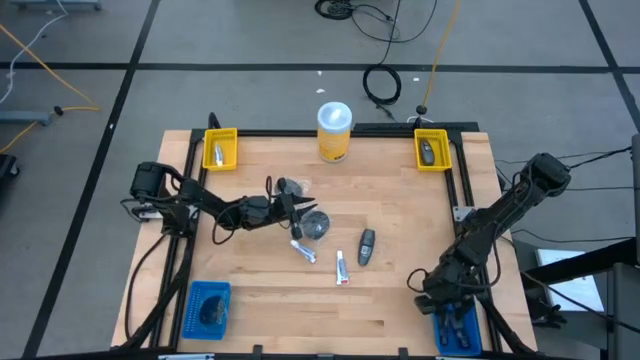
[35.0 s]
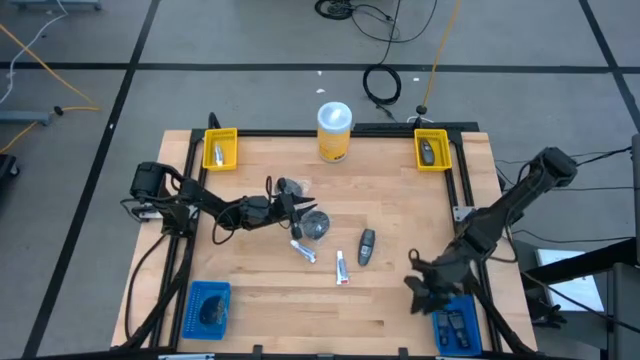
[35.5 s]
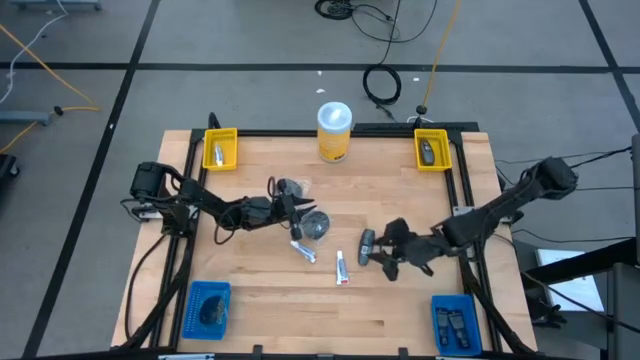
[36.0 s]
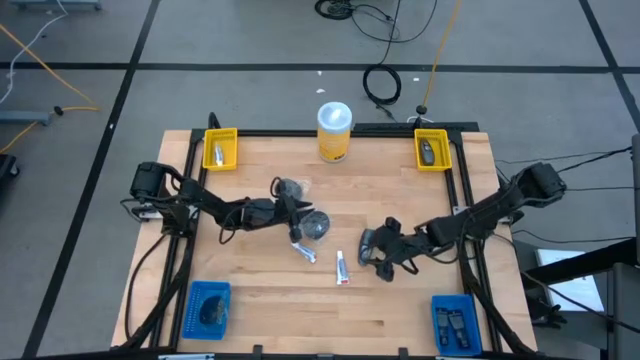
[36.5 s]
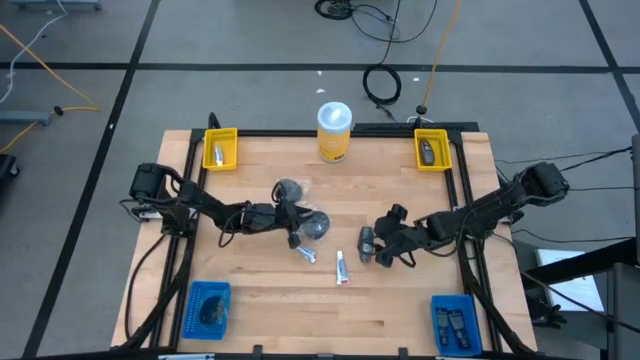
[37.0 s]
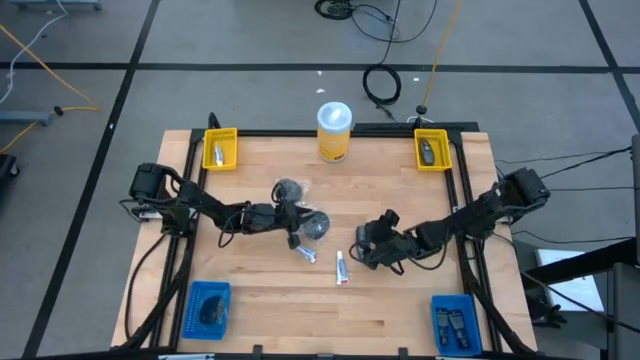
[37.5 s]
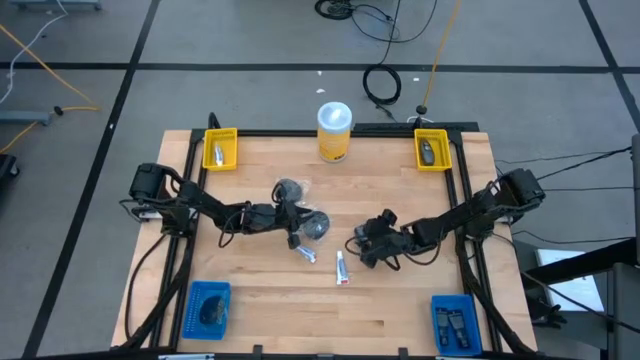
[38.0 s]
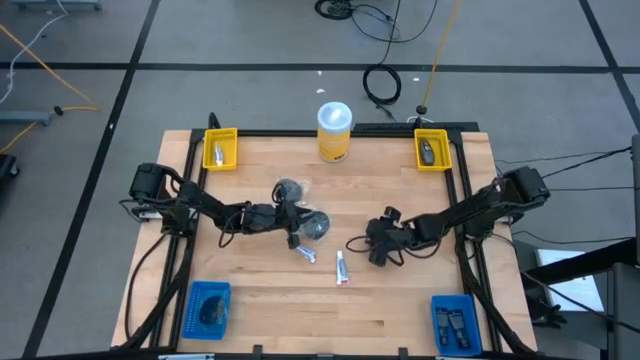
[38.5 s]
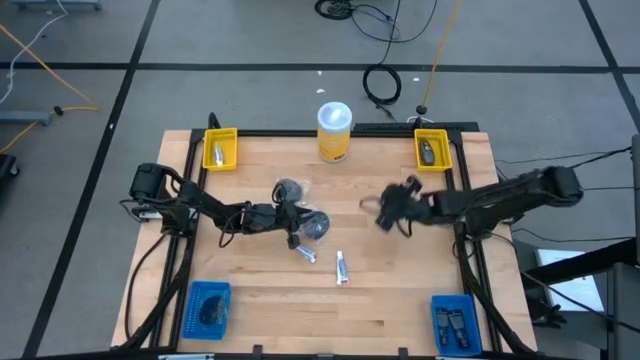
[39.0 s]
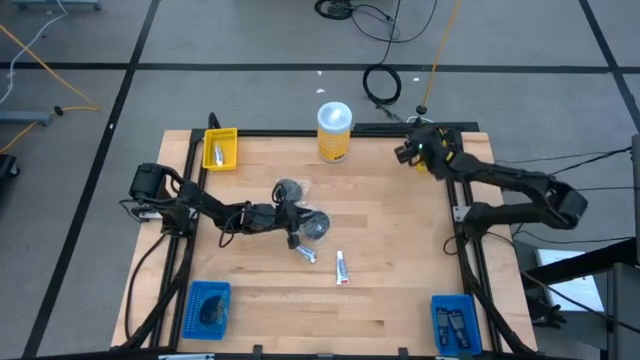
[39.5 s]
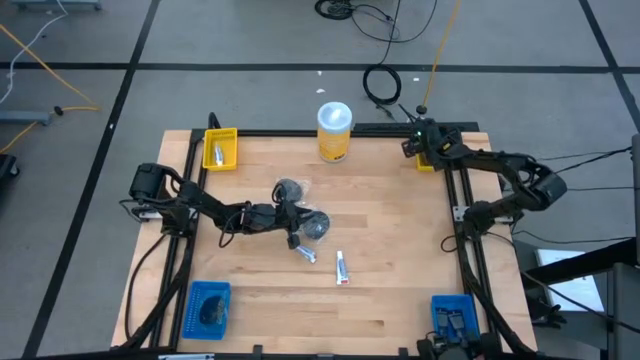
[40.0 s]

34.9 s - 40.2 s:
Task: Pick & Place Travel size toiletries
Put the gray deodorant into the right yellow bin

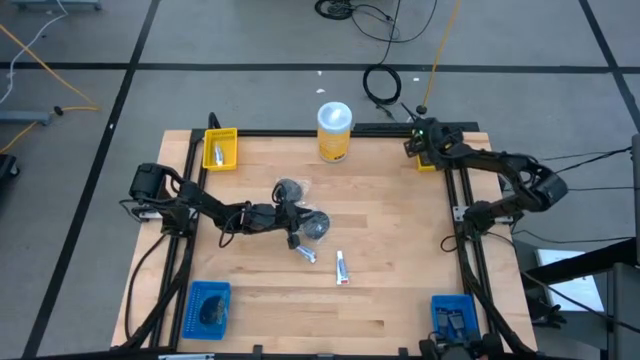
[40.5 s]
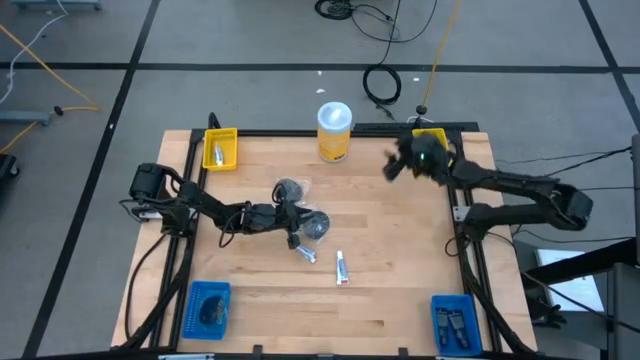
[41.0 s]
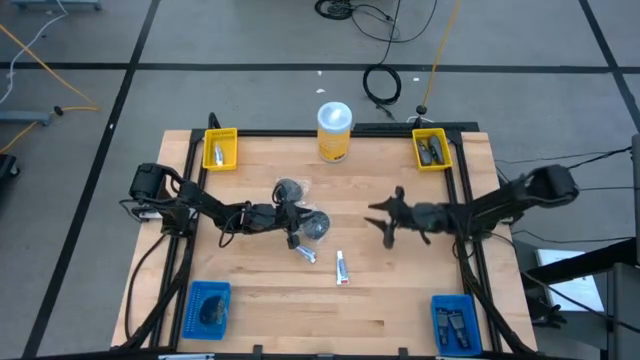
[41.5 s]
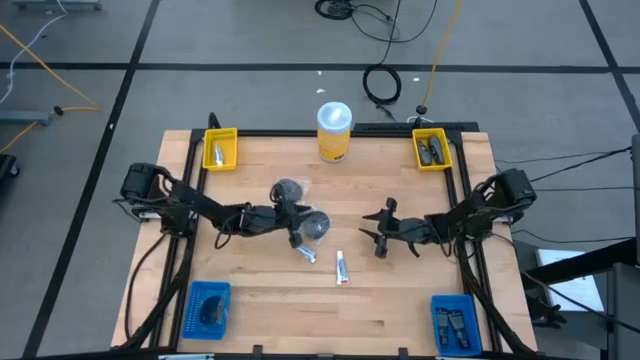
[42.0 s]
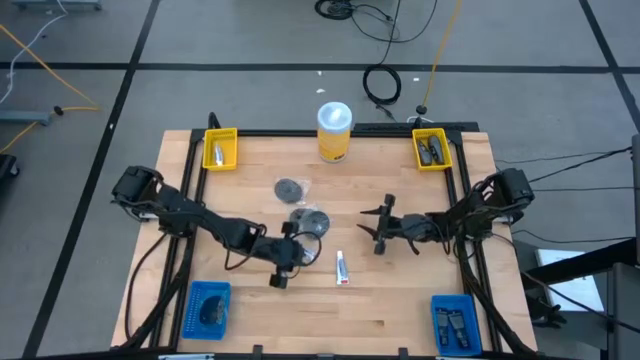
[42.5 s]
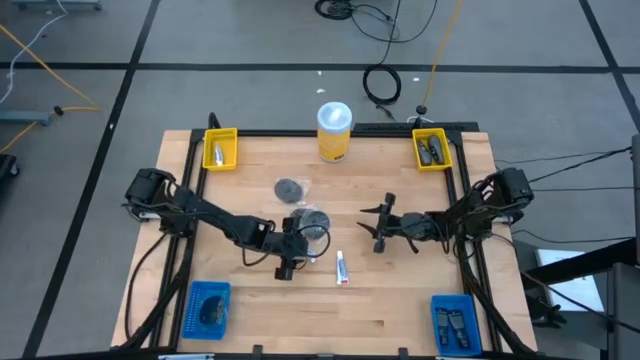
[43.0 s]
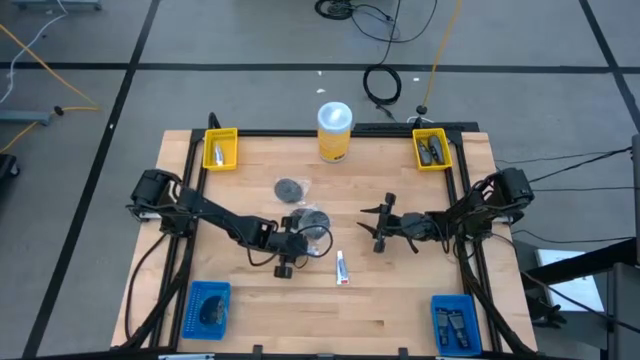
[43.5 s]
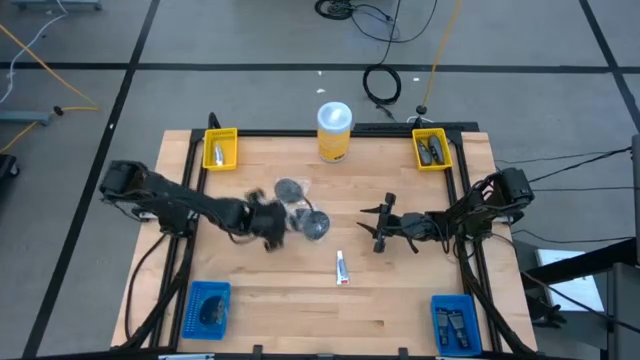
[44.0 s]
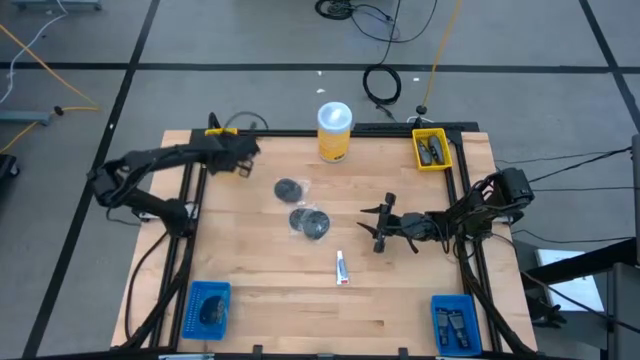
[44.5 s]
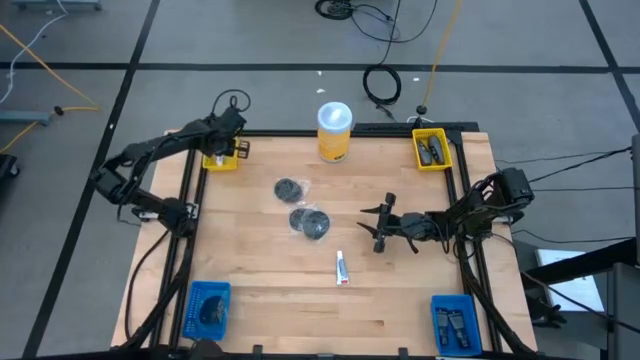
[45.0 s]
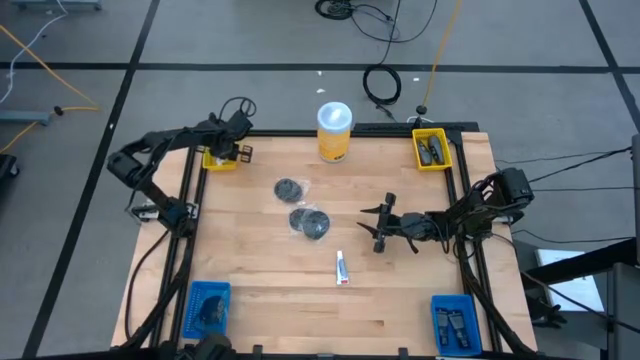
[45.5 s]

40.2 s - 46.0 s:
Put the left white toothpaste into the left yellow bin

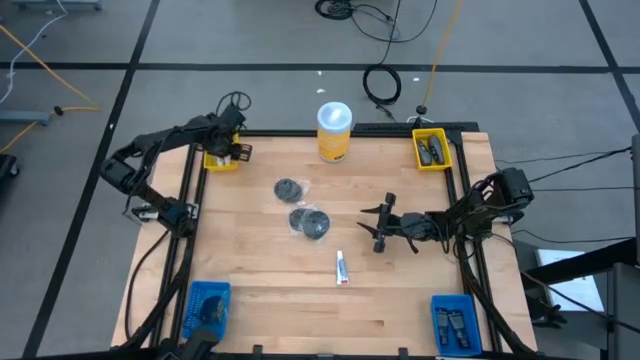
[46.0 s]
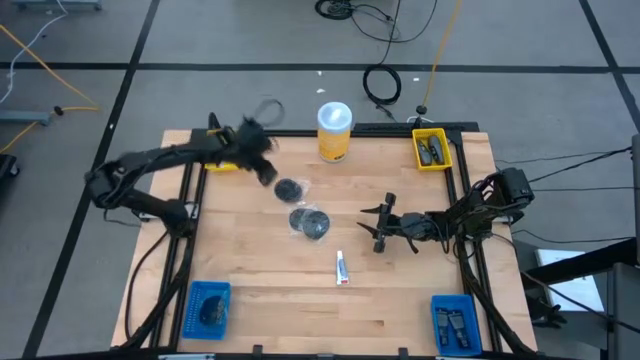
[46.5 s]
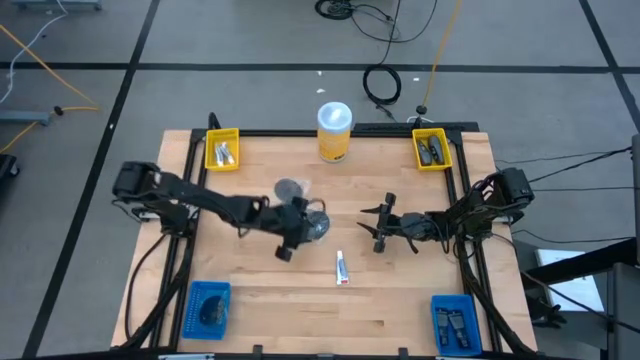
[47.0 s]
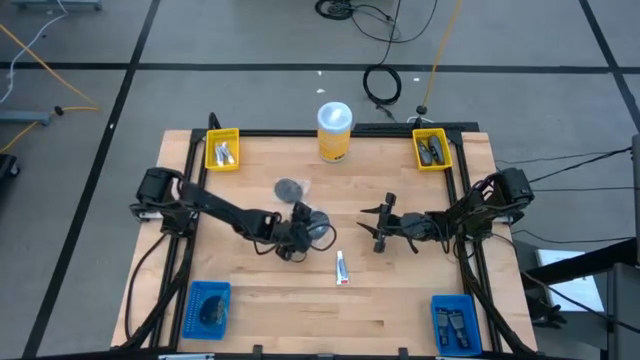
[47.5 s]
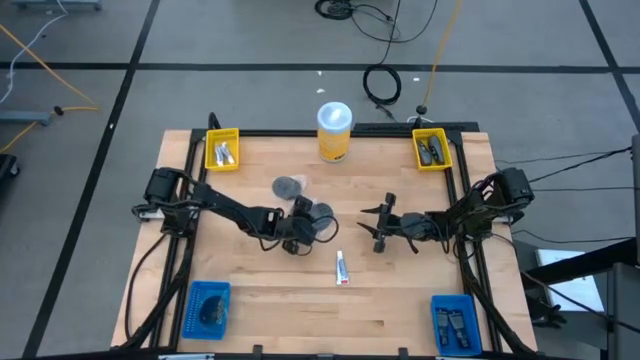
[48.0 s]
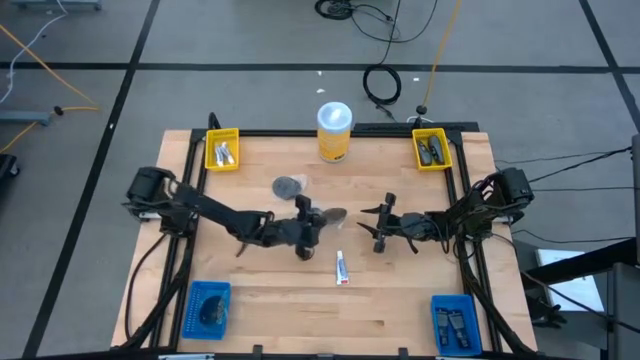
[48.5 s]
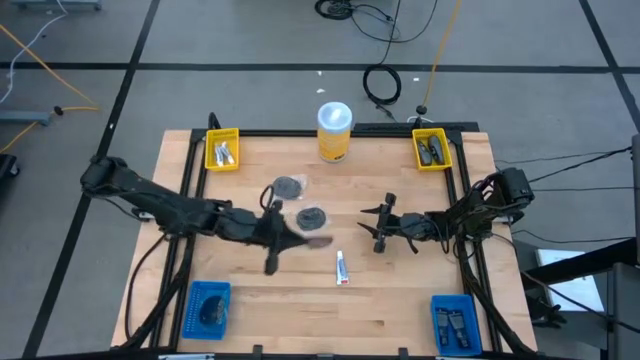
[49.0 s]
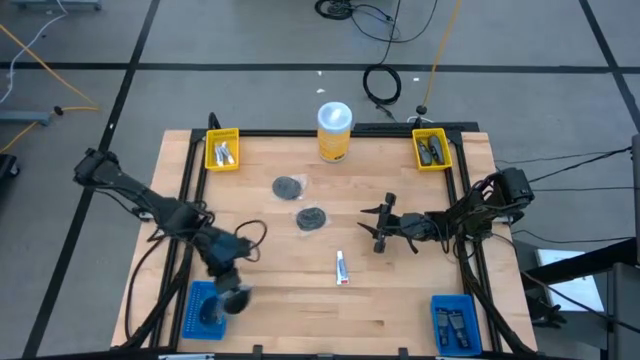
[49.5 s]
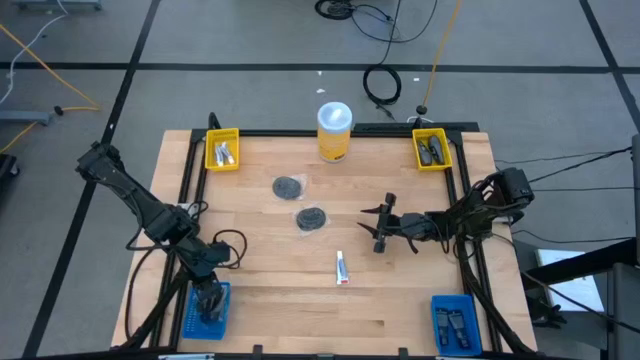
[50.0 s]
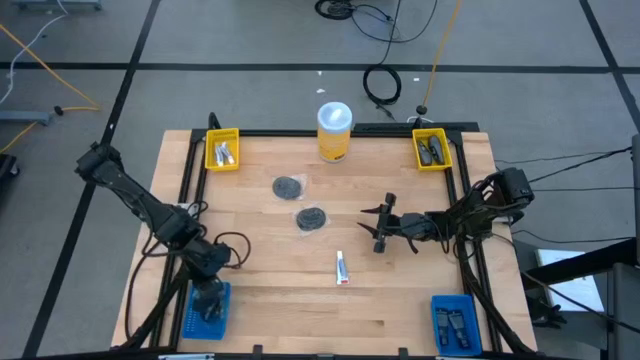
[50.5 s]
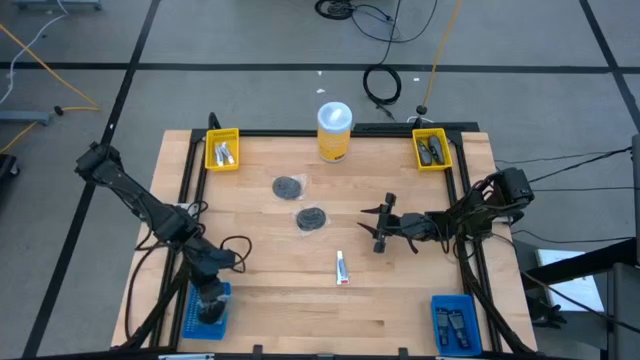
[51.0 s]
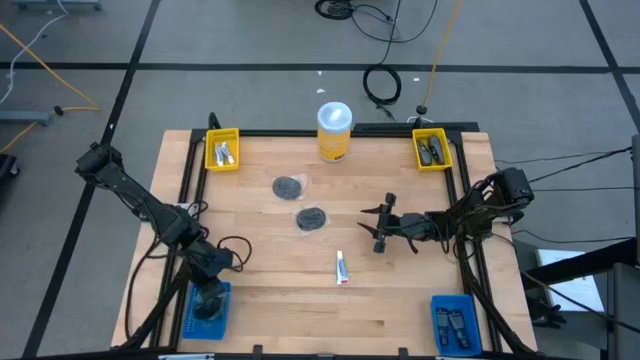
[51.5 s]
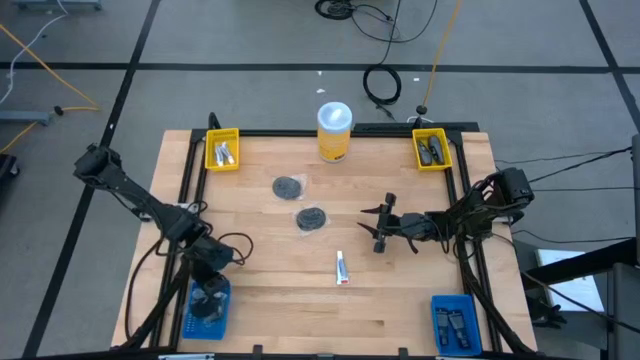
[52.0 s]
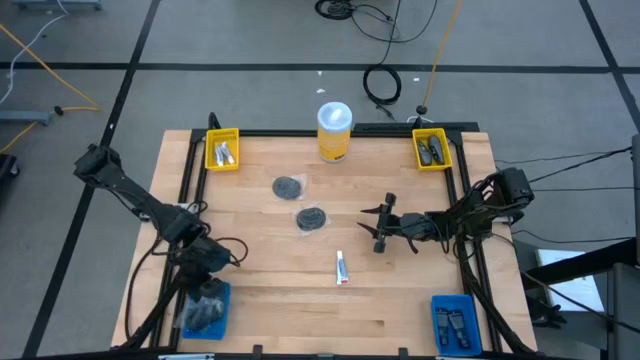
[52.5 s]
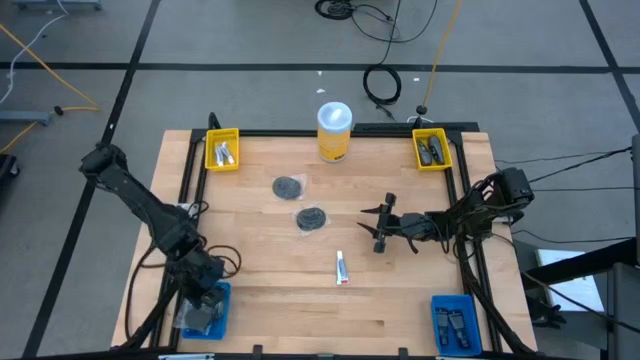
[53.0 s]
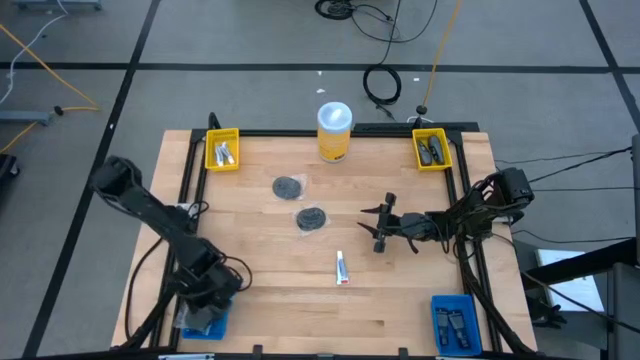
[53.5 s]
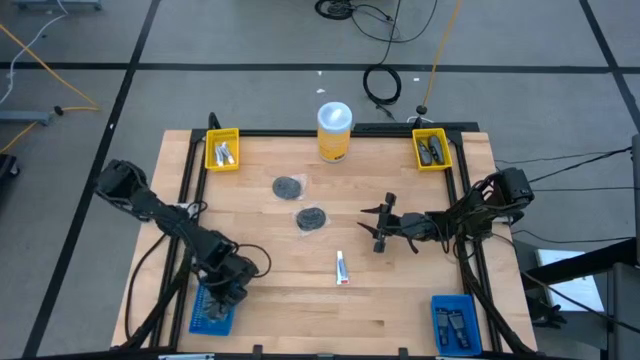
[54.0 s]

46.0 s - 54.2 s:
Put the black hairbrush into the left blue bin

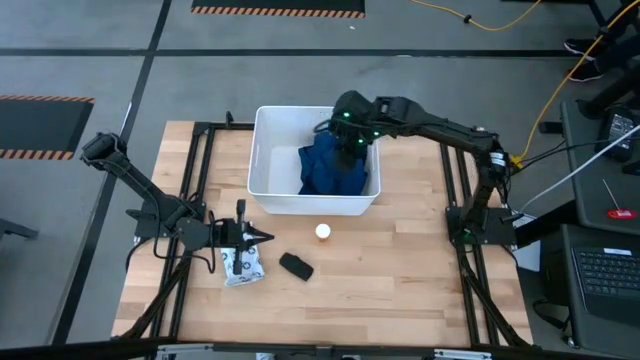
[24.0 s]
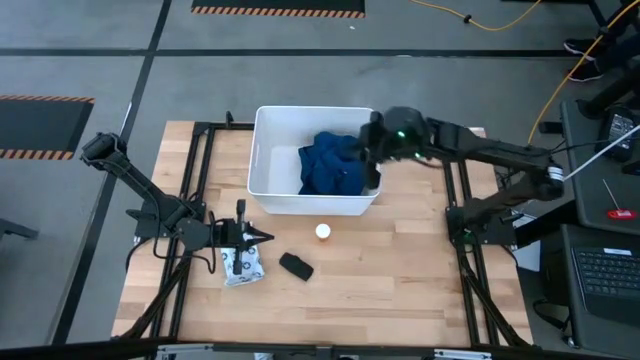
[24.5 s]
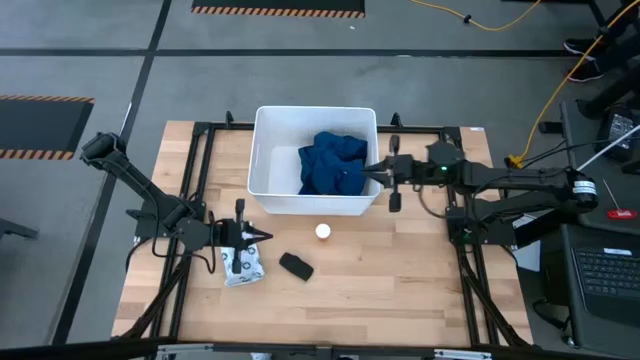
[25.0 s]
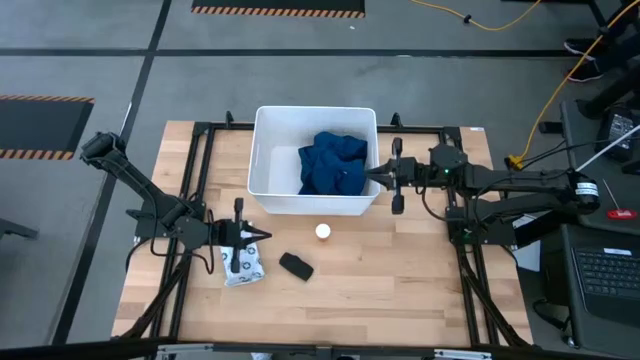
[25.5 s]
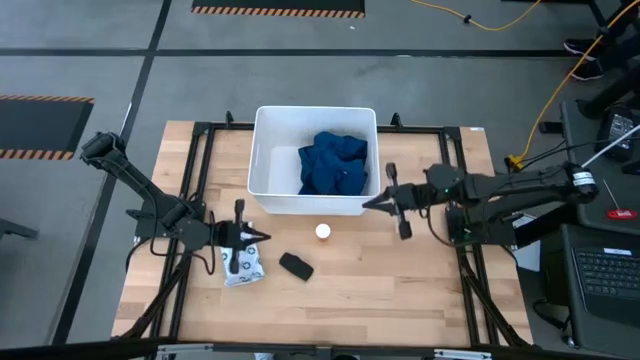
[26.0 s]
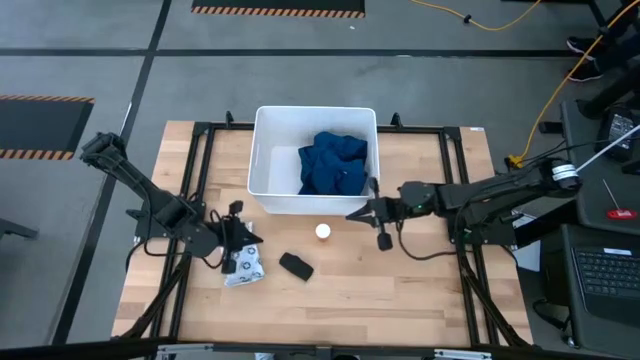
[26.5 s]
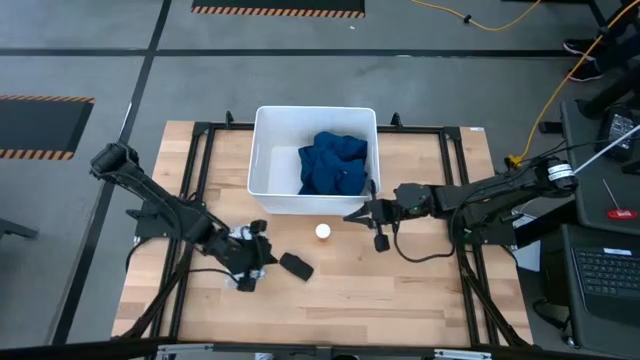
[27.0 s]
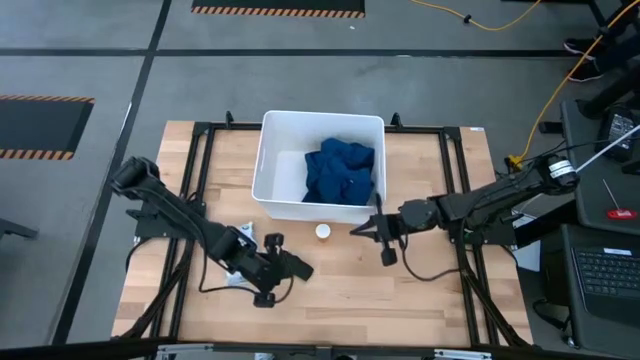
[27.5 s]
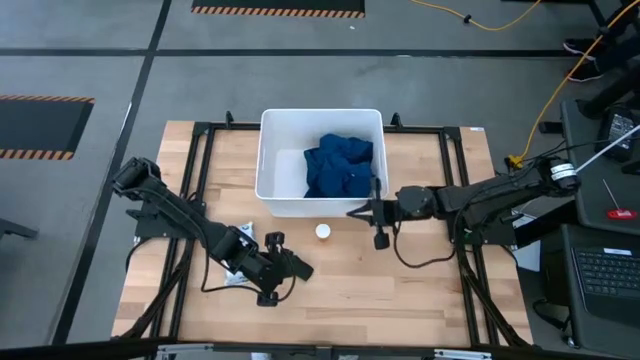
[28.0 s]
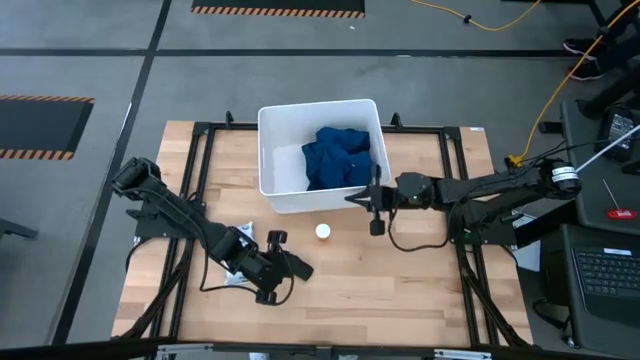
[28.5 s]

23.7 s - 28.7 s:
Task: Pick & place medical supplies in basket/bin
Adjust the white bin on the table
